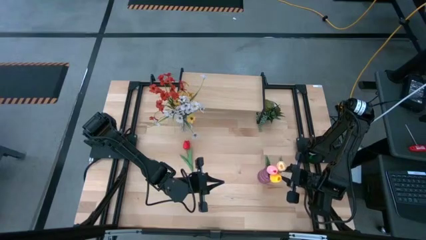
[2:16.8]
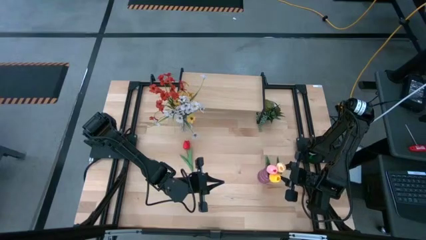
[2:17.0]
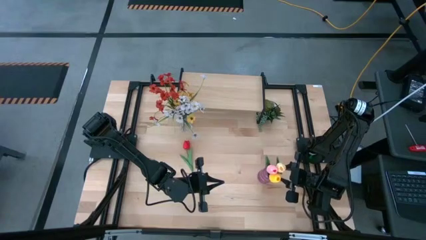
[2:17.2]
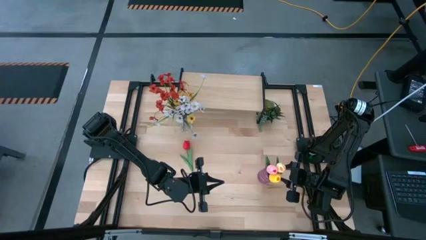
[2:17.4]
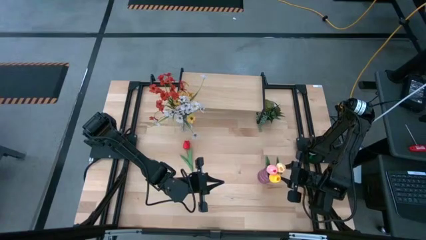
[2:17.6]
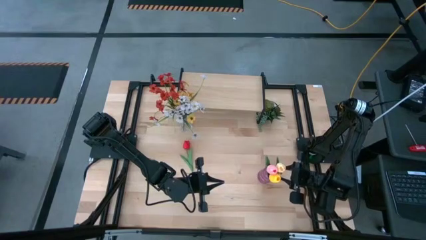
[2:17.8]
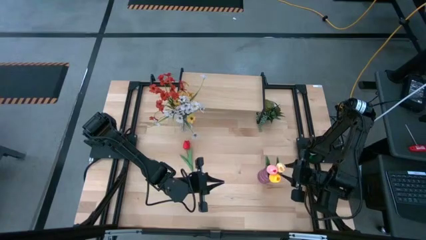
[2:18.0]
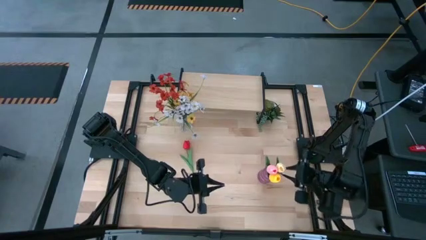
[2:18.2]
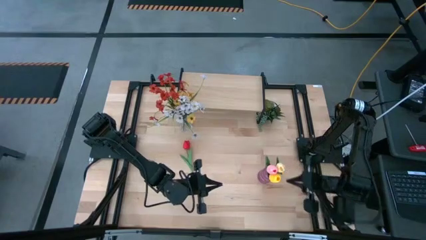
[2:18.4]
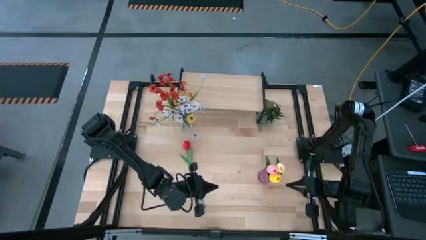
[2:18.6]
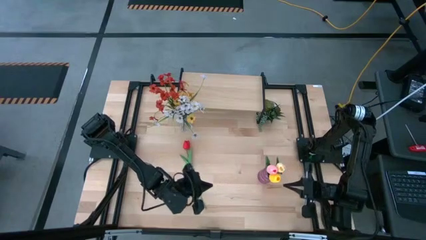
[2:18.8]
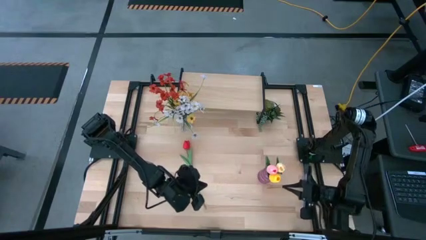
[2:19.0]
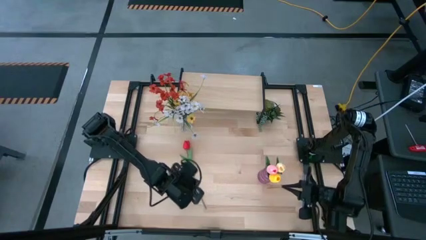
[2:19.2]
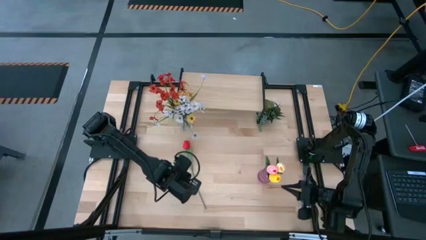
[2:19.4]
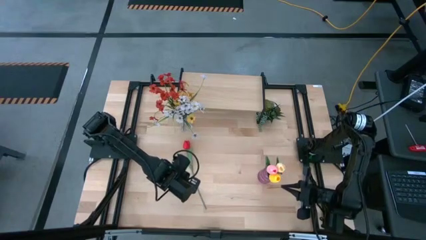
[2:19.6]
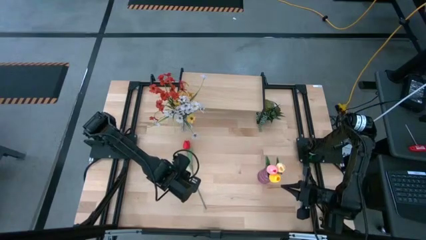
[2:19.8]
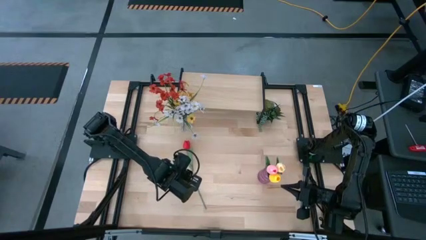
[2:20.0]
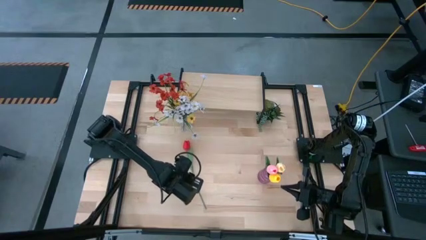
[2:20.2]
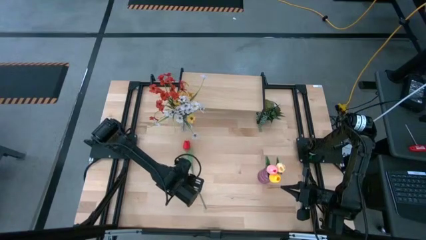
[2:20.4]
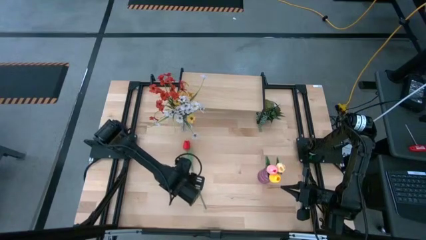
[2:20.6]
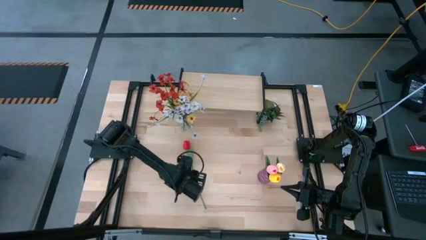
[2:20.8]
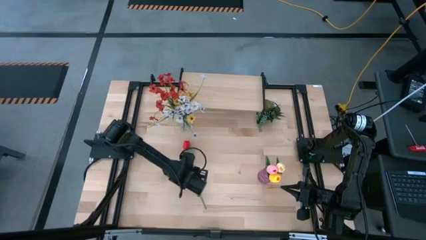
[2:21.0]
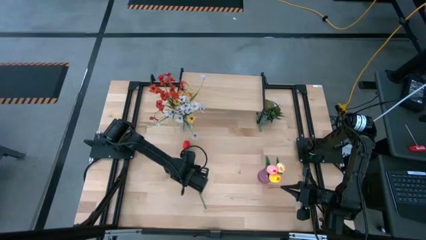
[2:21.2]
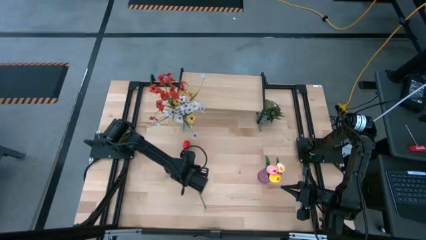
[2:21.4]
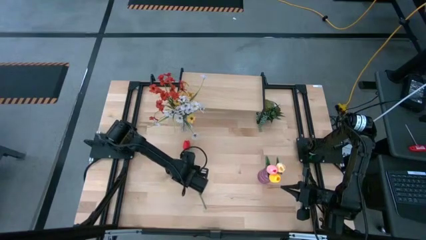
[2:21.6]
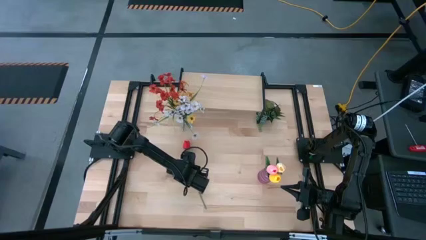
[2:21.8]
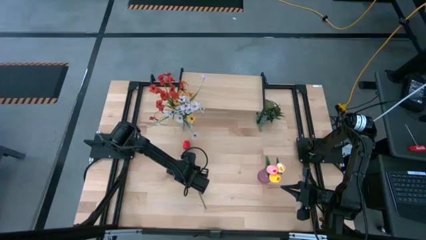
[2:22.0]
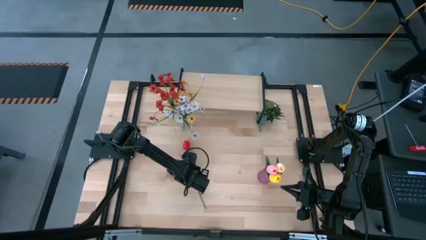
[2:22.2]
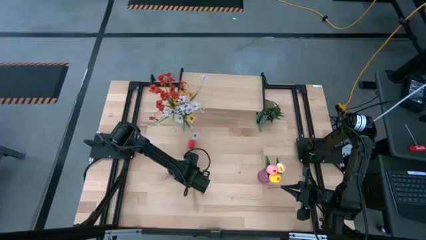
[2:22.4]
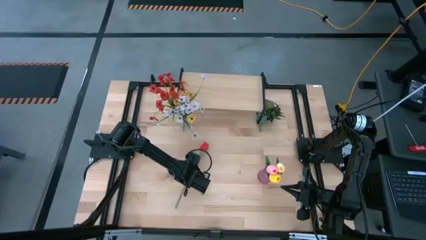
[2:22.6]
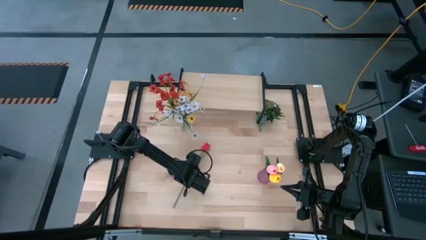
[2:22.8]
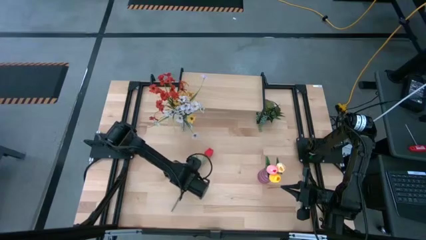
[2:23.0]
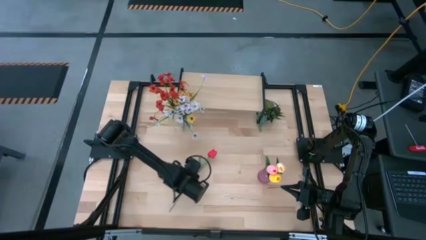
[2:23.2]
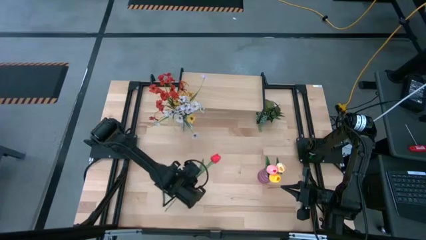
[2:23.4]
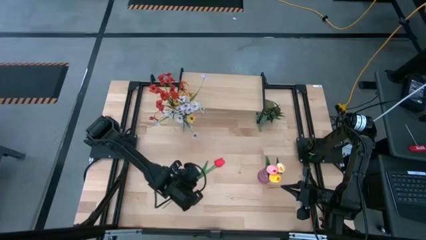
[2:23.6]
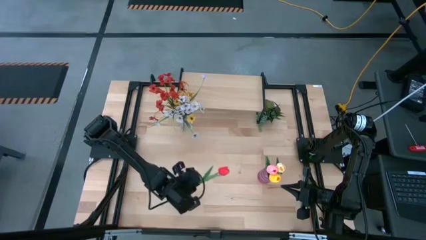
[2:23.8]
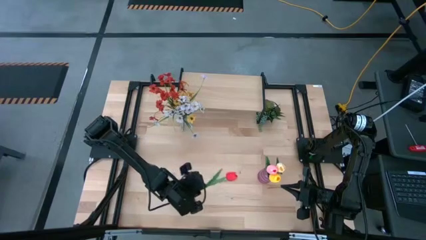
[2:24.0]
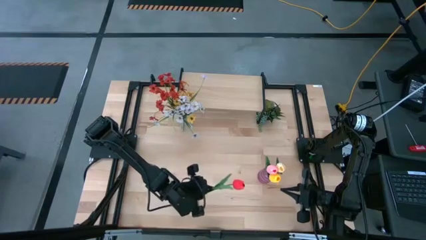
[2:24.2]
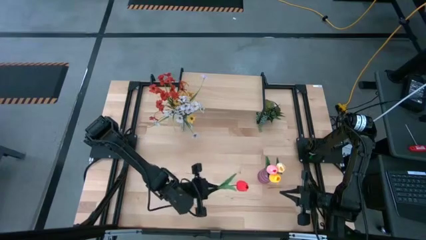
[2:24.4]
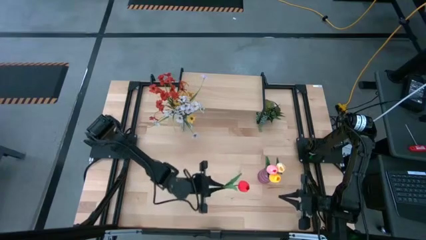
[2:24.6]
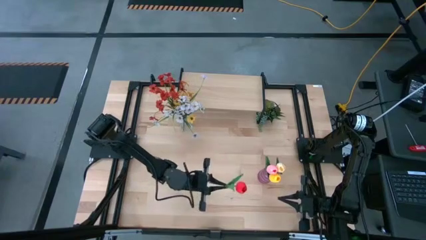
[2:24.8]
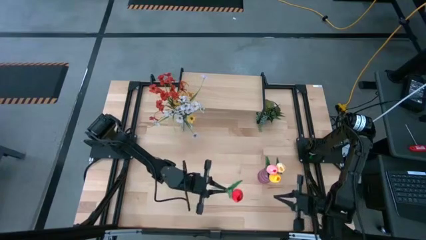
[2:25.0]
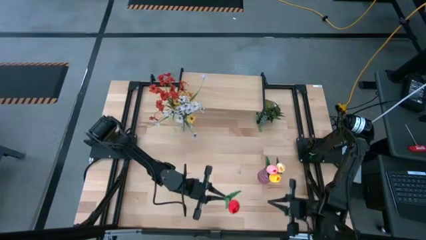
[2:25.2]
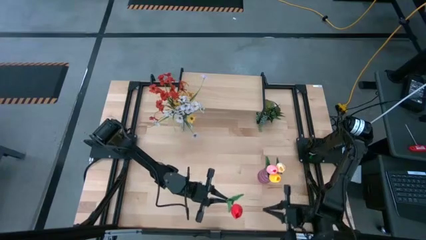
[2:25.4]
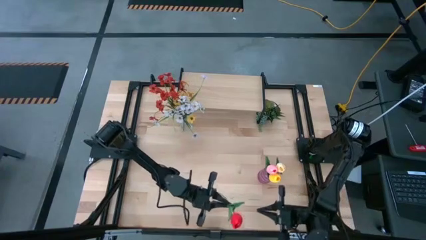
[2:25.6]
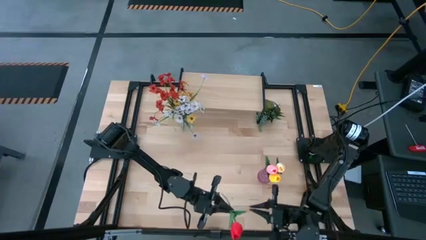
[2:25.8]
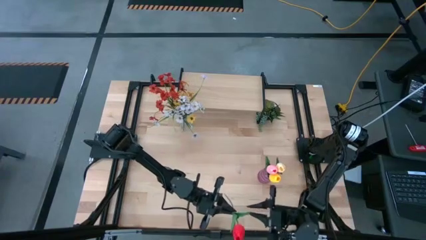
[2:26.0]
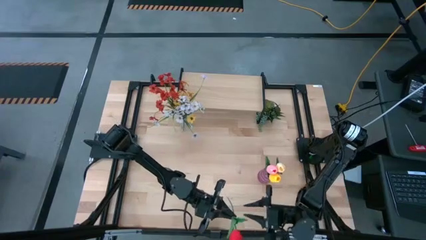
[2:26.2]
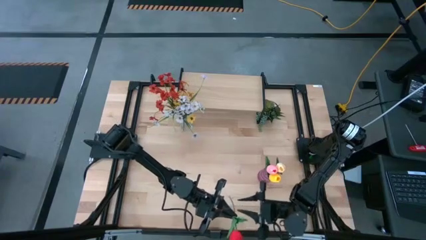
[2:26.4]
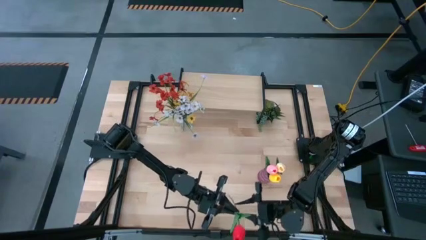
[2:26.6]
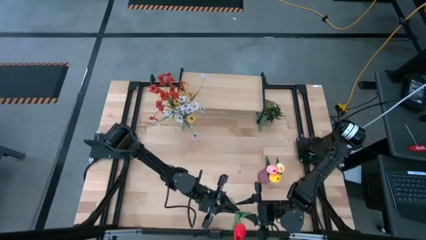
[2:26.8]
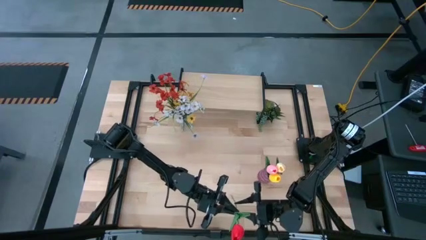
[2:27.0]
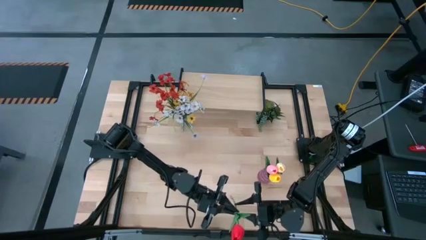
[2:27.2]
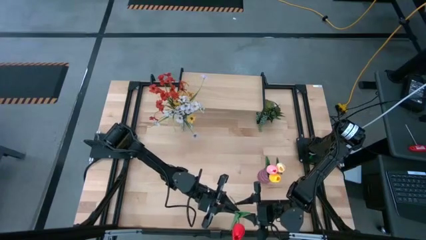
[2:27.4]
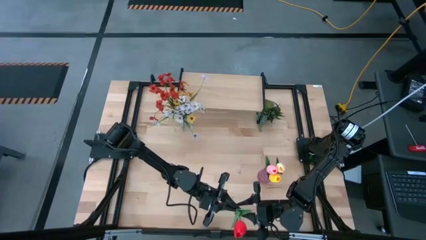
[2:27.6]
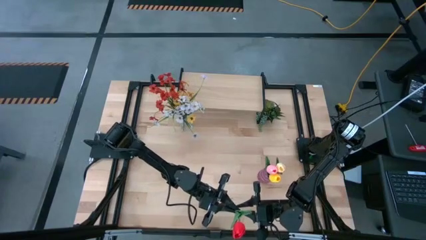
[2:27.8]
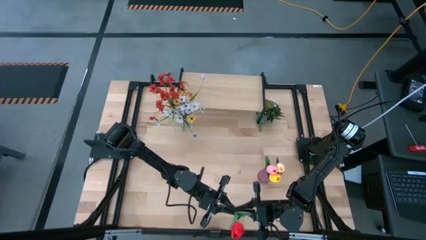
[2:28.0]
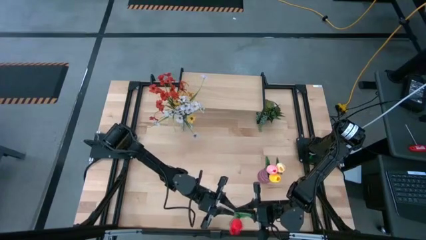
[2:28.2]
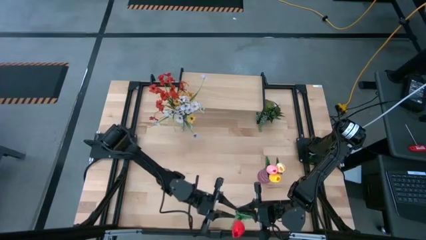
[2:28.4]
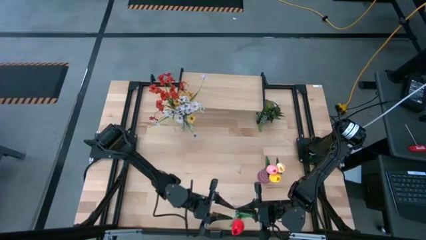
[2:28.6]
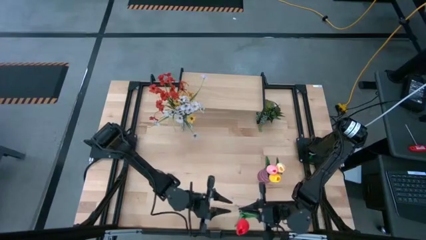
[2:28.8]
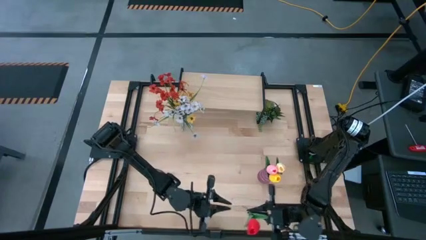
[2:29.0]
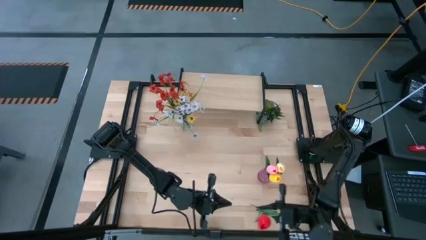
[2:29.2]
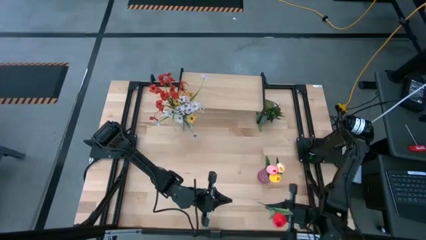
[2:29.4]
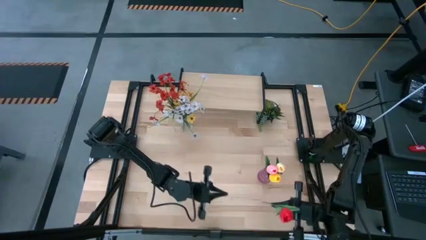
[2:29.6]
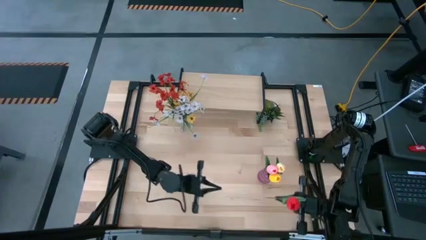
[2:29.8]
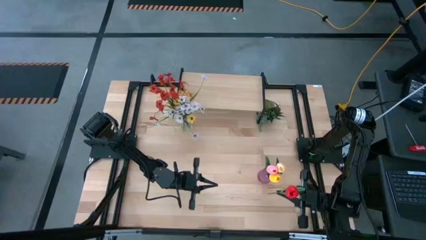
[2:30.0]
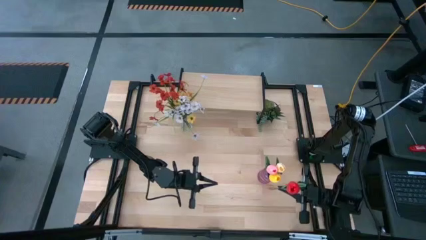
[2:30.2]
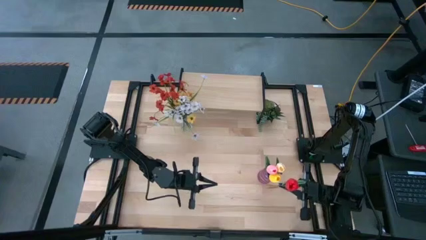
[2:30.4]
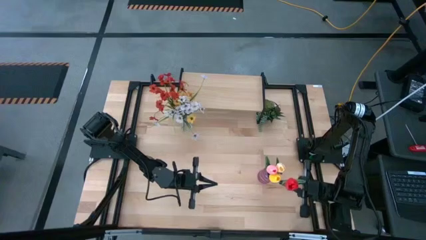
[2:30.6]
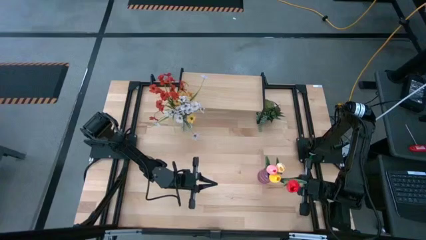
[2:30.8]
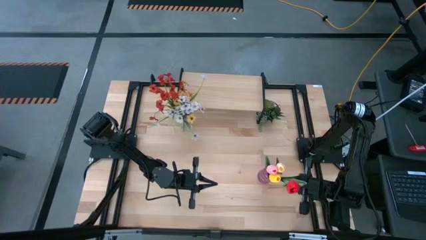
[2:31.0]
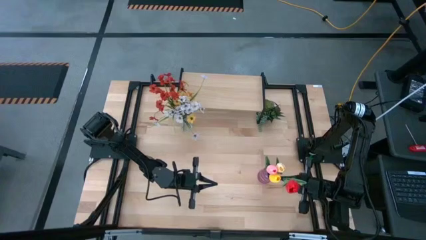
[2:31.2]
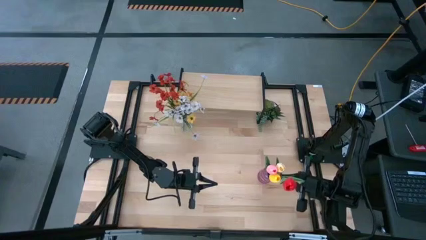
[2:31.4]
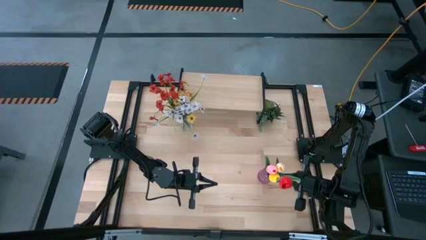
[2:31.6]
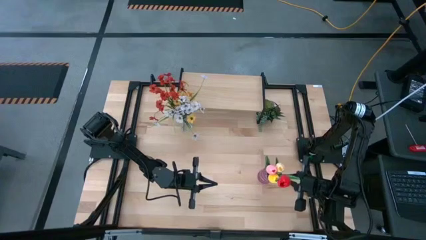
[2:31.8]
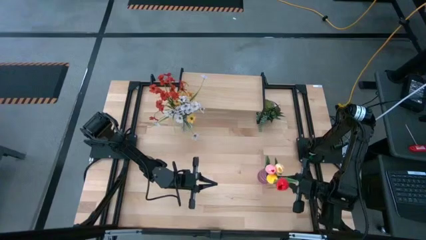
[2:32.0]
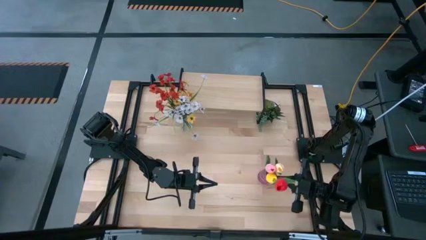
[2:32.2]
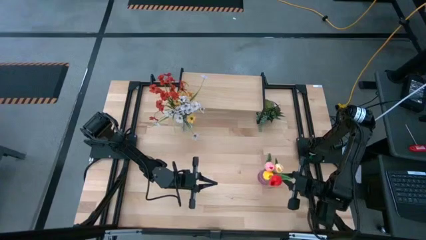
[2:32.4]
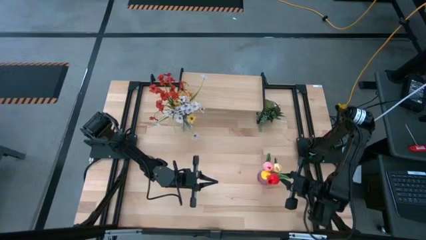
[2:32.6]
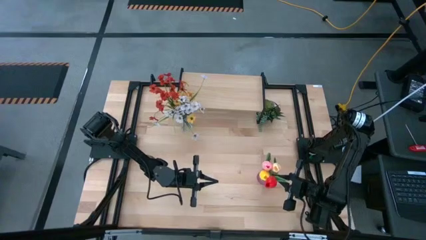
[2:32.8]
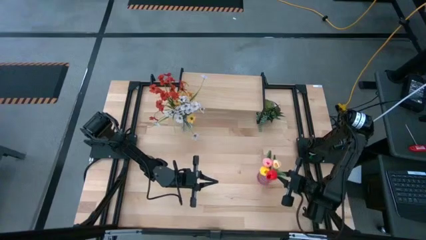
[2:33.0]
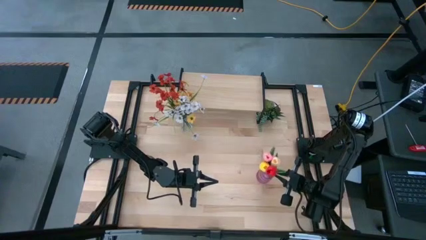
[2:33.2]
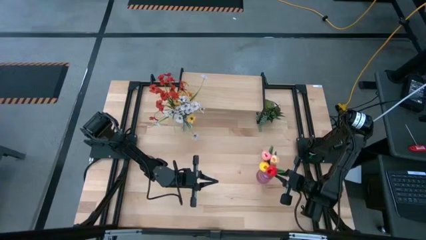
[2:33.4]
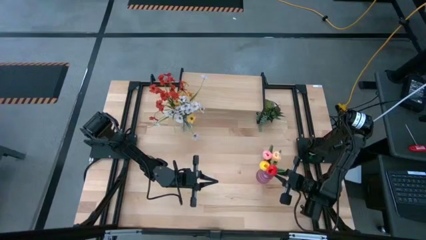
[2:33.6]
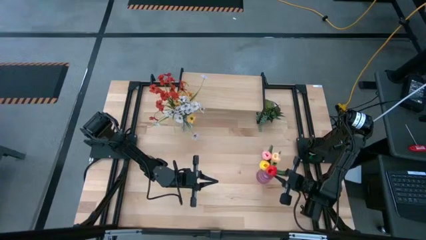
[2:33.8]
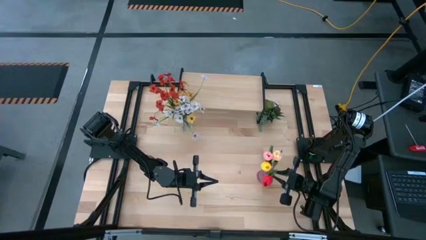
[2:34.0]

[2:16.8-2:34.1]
Task: Pick and place flowers into a vace then onto a shelf
Put the red flower into the purple vase
